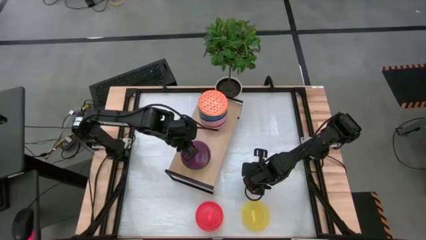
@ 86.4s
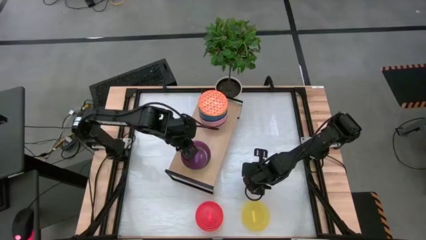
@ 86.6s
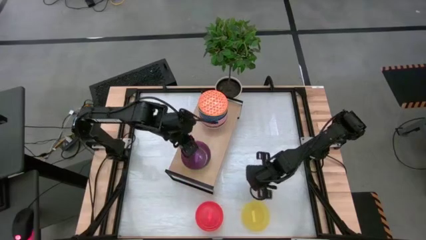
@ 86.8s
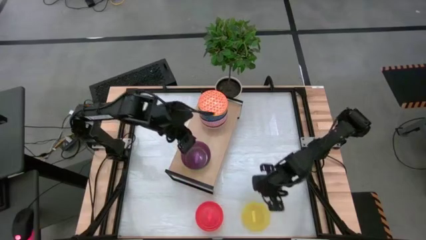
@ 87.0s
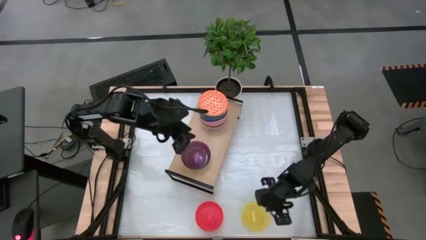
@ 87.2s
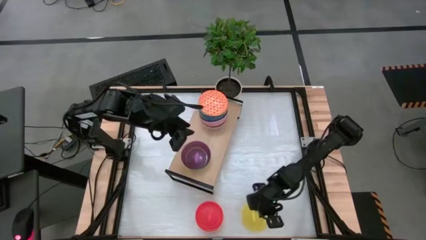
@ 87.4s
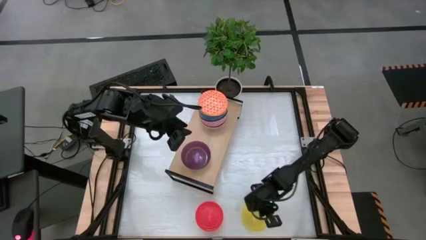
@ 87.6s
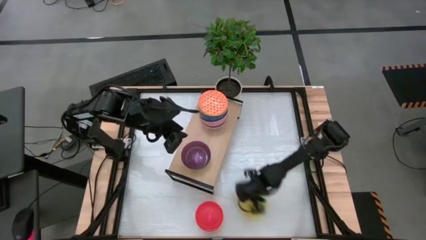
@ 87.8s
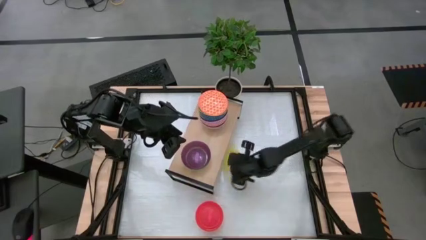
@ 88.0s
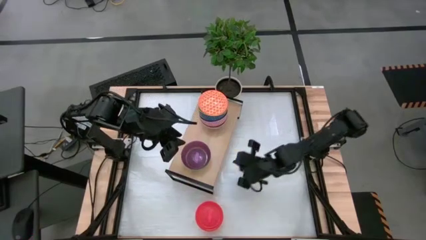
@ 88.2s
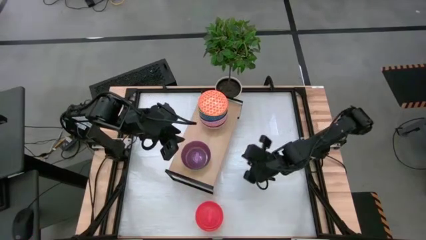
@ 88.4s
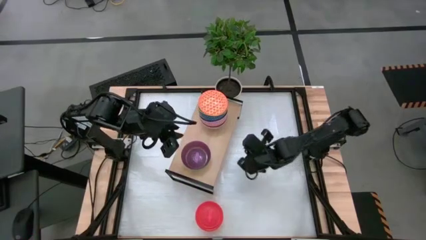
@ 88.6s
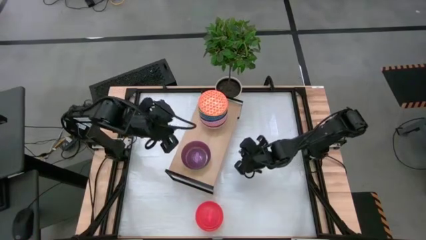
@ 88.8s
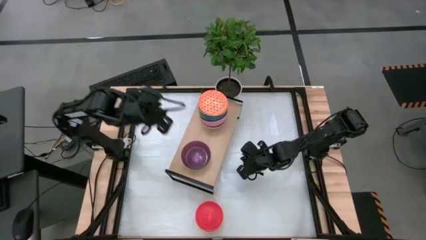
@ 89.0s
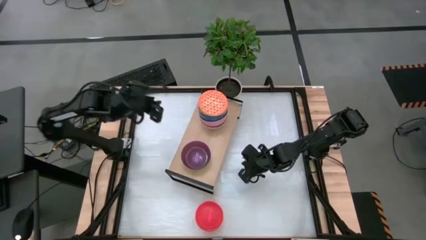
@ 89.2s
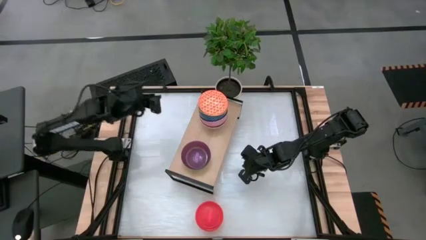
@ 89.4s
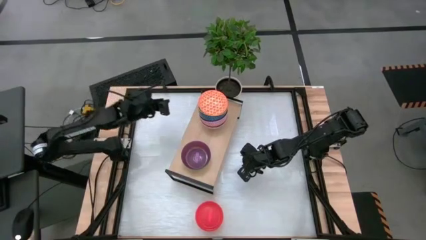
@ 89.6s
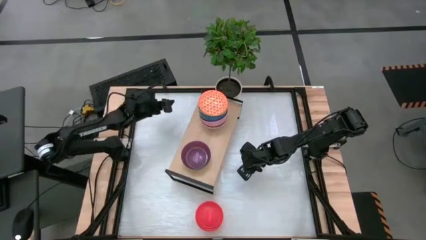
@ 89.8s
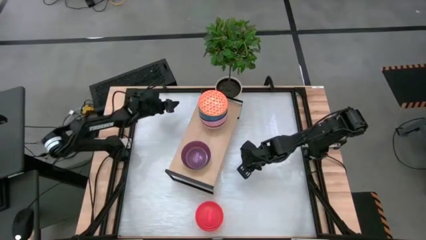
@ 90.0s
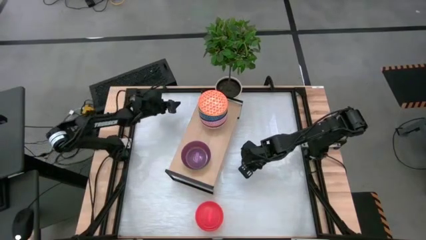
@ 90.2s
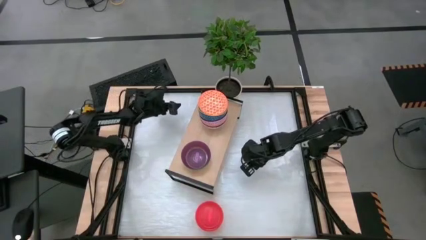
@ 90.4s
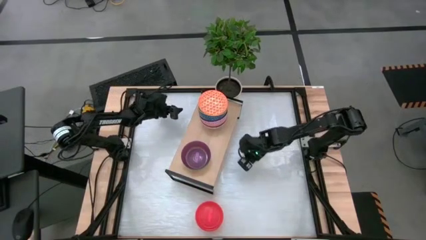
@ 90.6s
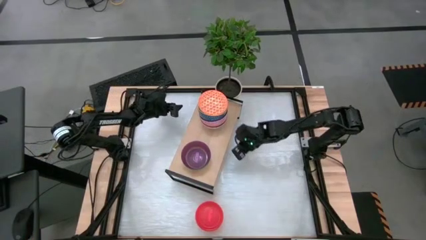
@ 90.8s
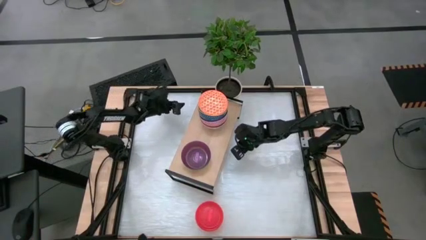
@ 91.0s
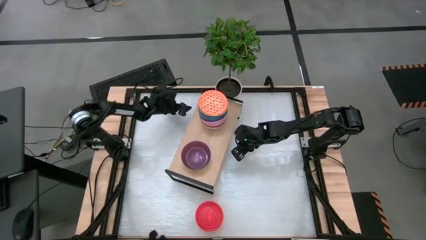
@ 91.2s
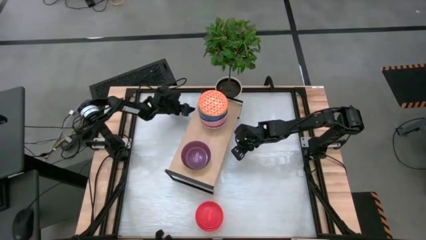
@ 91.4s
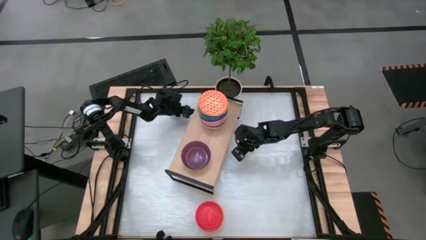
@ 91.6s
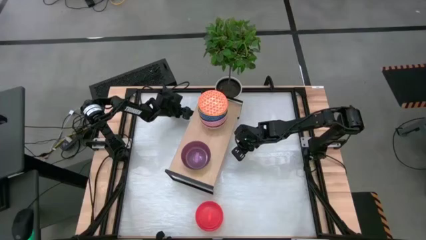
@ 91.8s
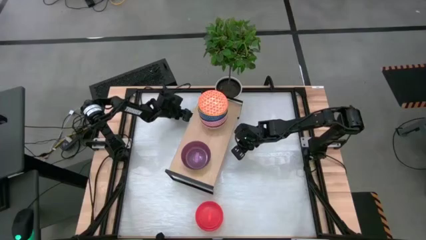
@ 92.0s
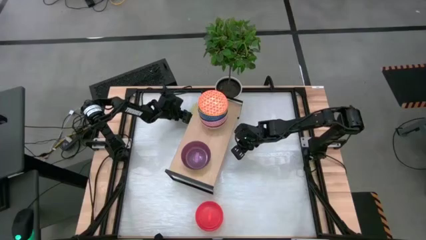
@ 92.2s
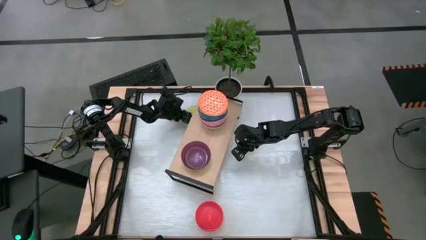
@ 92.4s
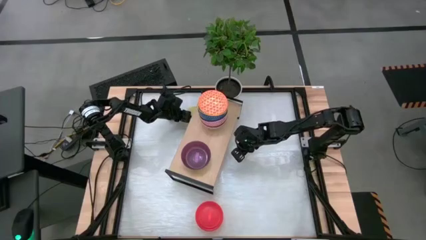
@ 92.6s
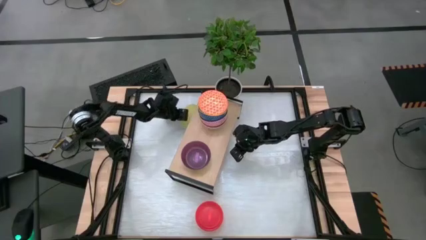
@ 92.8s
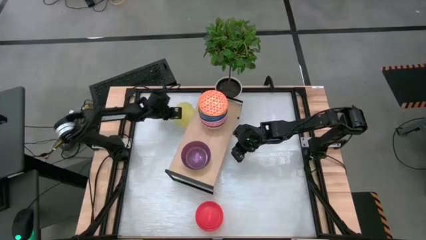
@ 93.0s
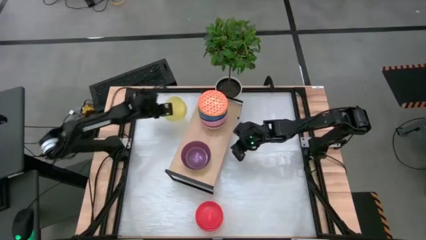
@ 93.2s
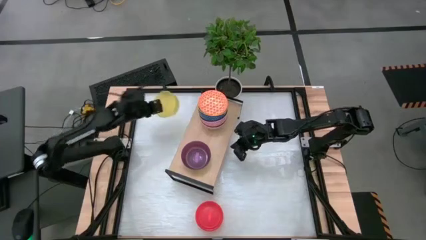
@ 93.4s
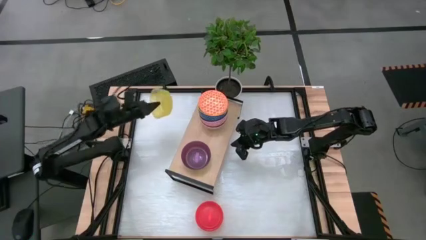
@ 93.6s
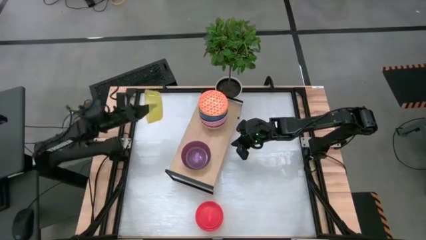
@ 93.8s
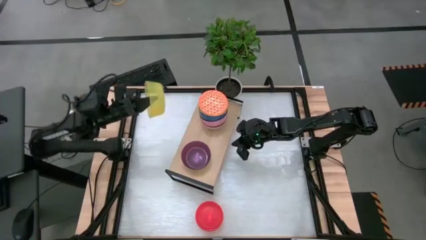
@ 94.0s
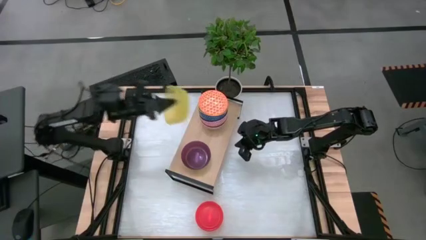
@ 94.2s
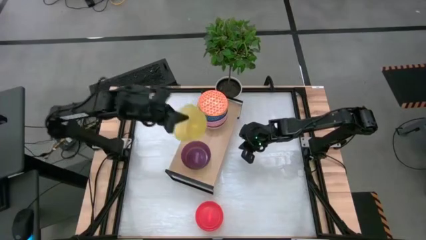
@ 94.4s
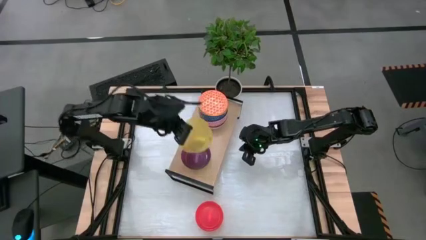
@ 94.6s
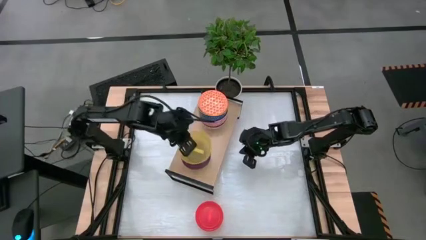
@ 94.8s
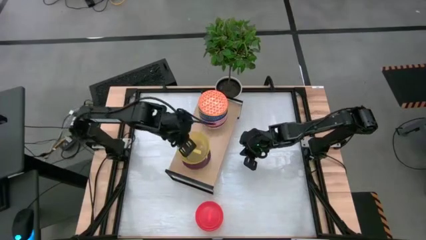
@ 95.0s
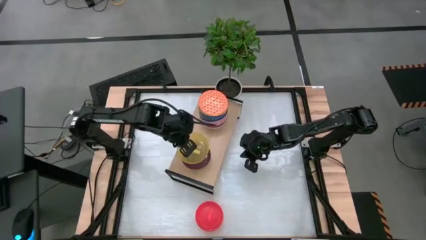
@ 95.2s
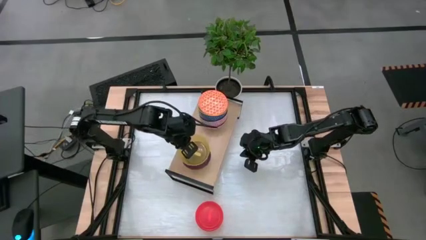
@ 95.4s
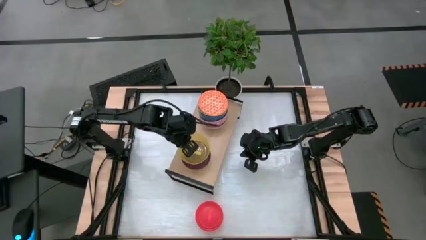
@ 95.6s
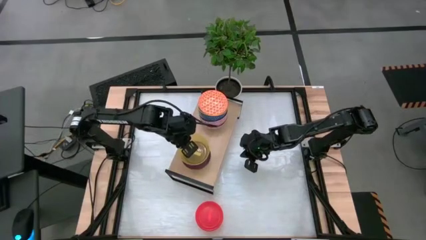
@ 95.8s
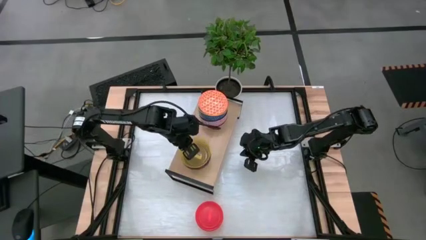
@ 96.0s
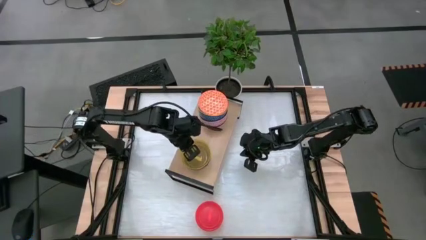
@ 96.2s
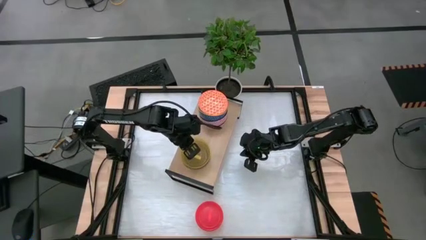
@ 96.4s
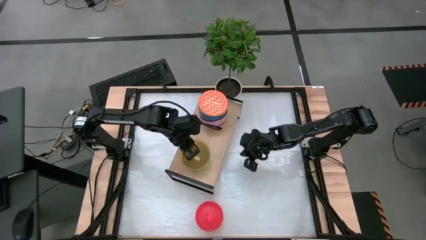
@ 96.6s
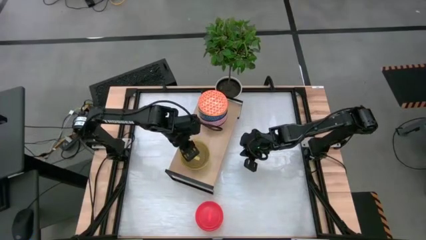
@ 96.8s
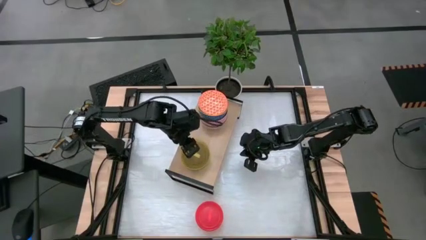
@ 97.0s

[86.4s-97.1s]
Task: Place and stack bowls onto a shelf
Stack the yellow bowl on top of the purple bowl on the shelf

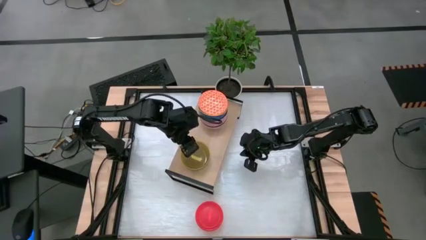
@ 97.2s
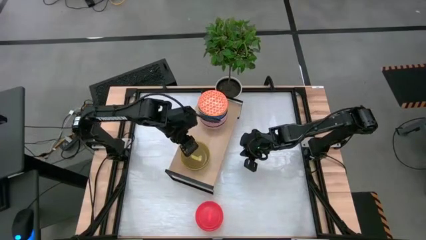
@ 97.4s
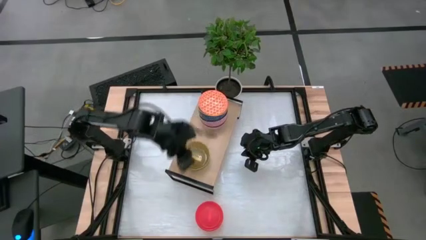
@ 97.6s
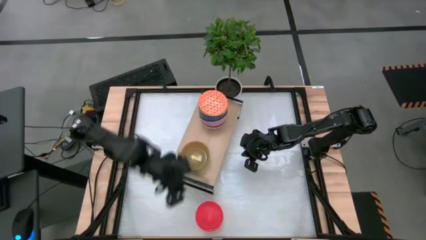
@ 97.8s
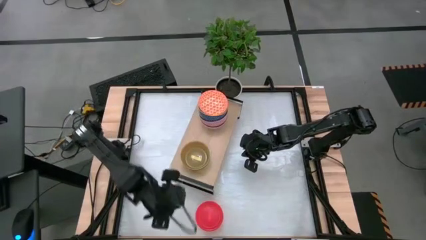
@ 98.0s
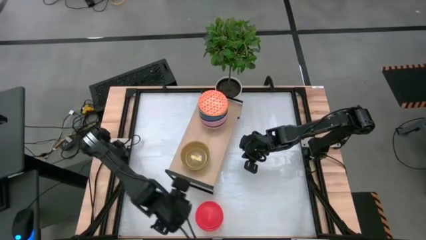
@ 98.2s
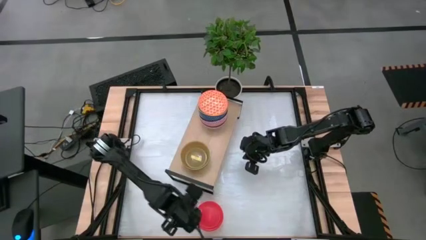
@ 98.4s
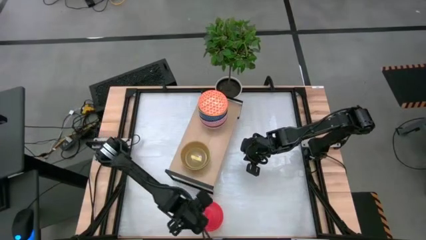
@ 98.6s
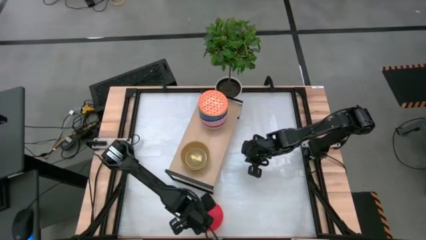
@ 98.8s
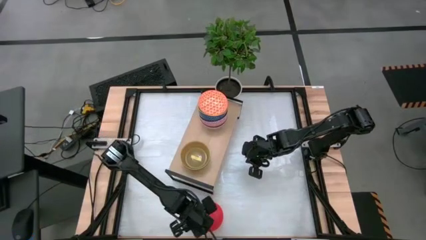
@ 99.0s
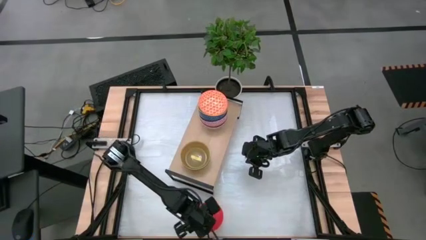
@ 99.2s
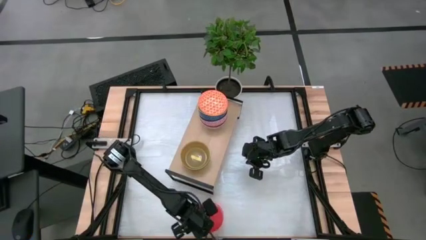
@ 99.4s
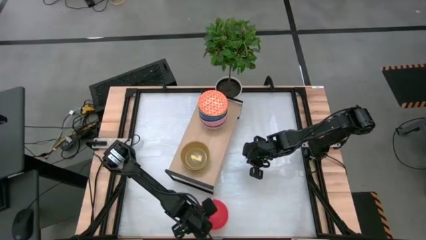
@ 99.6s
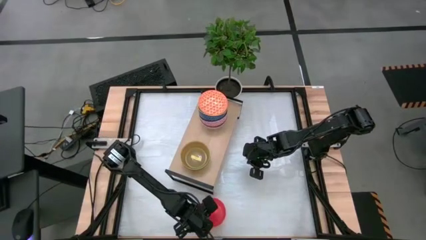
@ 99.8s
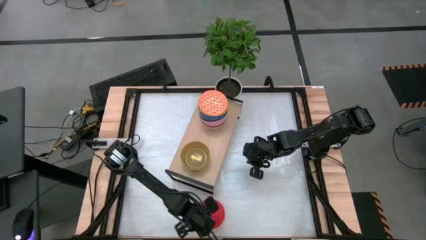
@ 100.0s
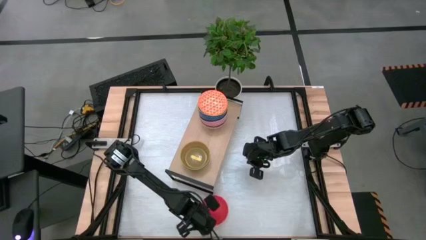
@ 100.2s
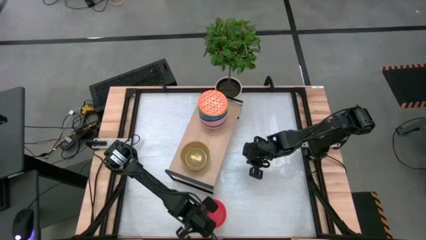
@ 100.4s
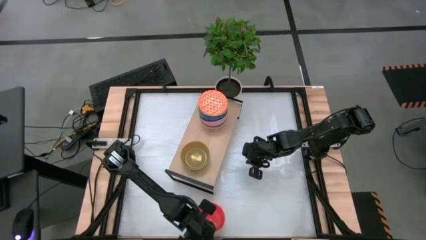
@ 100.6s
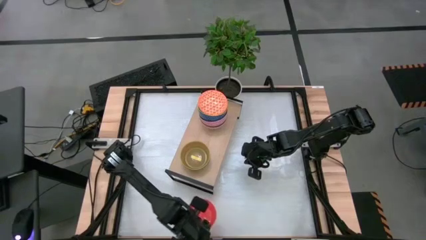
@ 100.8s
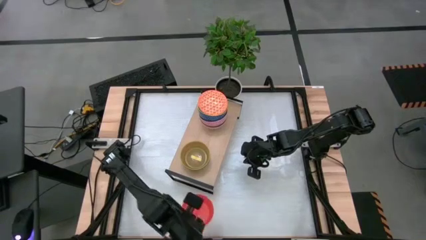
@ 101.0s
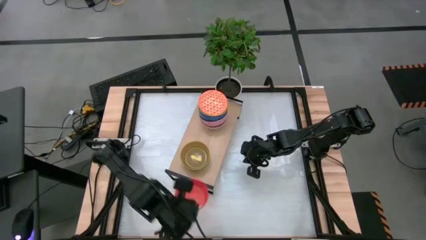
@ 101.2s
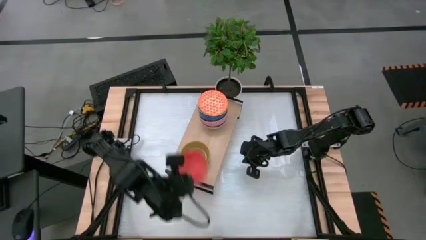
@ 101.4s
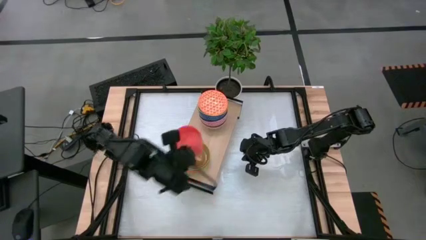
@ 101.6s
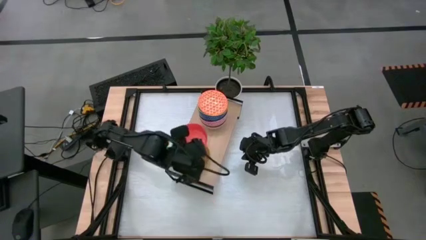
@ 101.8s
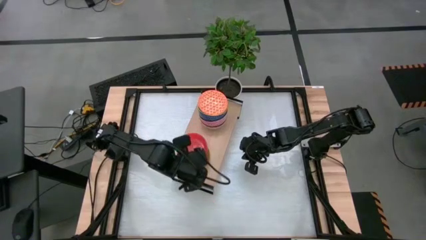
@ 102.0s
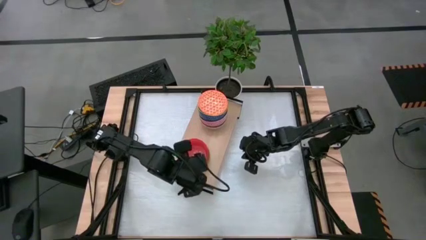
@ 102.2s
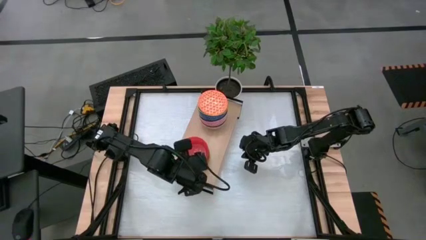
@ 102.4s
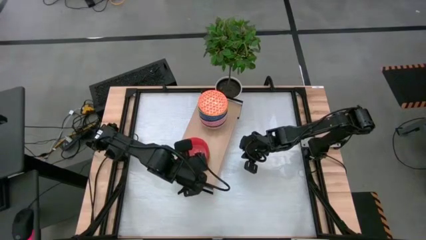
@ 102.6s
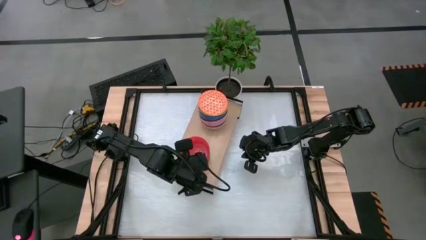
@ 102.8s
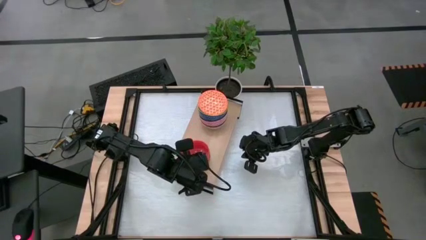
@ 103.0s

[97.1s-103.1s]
Stack the orange bowl on top of the yellow bowl on the shelf

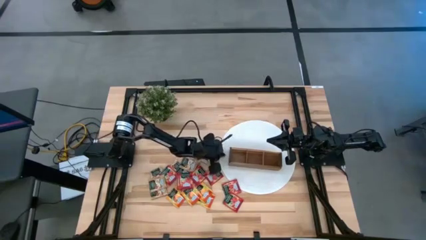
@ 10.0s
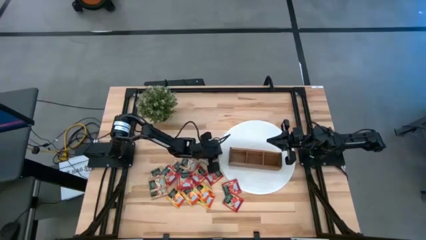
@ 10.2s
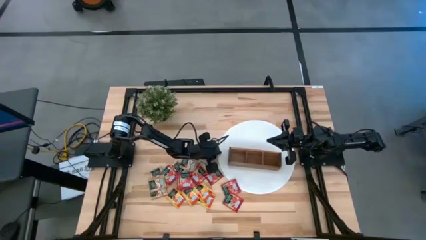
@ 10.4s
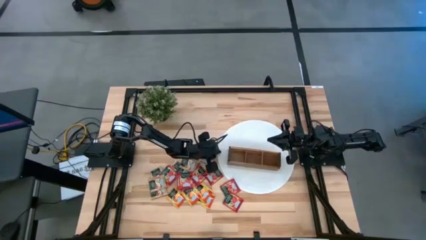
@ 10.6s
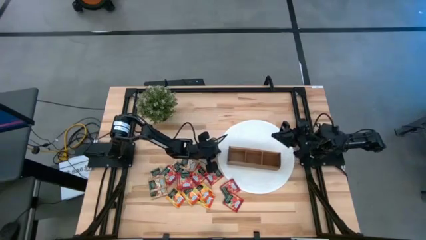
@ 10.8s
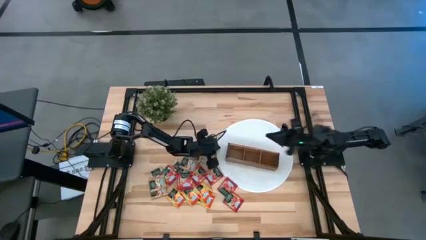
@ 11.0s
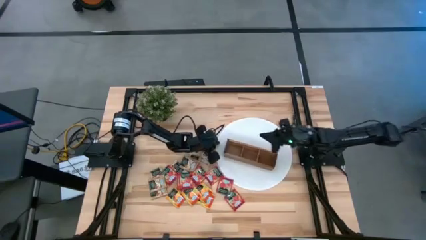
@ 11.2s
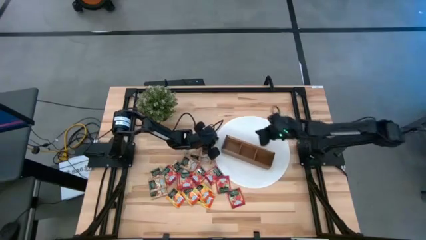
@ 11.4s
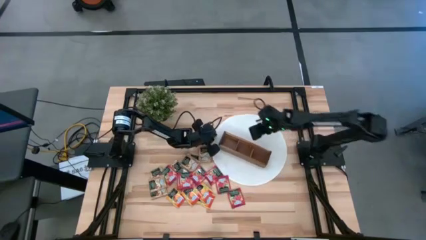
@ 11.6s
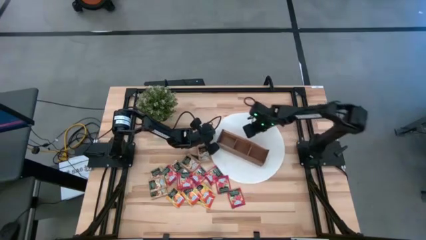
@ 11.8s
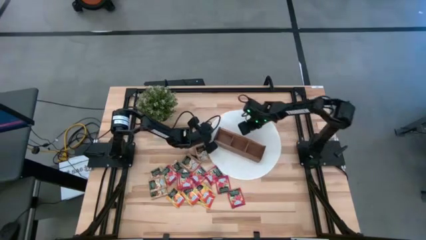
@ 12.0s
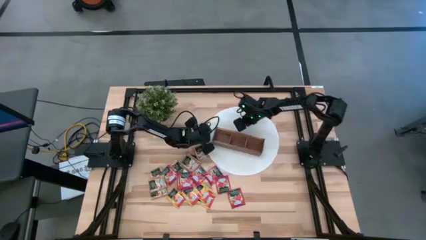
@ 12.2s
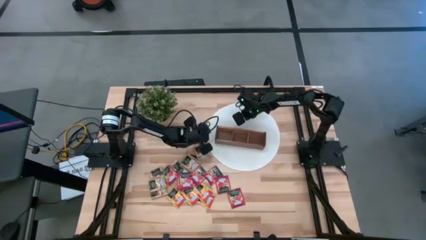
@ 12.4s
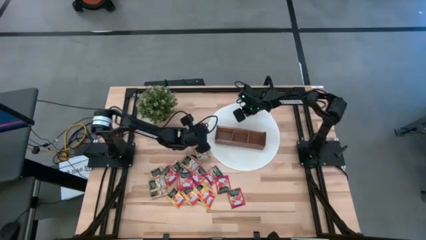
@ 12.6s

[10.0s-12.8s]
Task: Pick & Place Tea
Adjust the white mat
